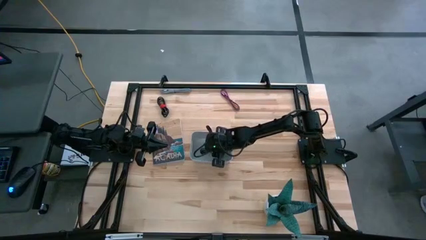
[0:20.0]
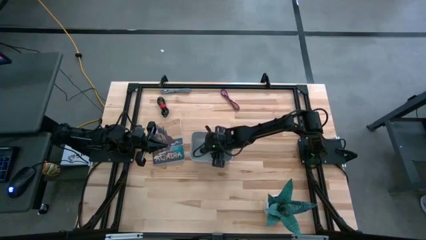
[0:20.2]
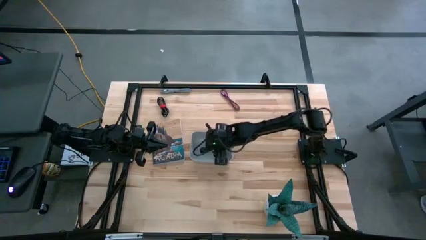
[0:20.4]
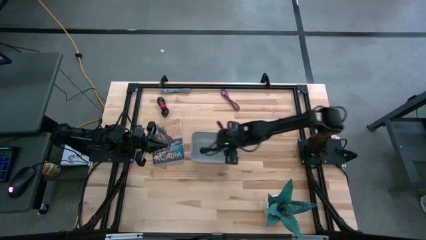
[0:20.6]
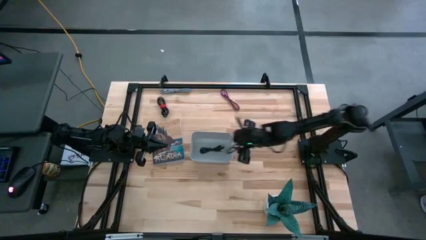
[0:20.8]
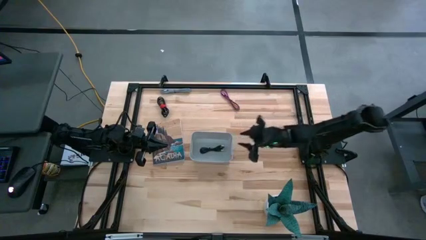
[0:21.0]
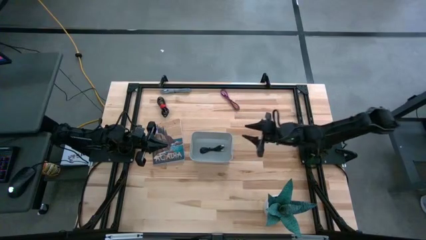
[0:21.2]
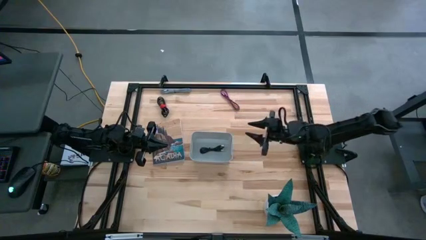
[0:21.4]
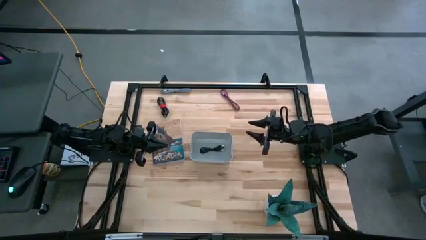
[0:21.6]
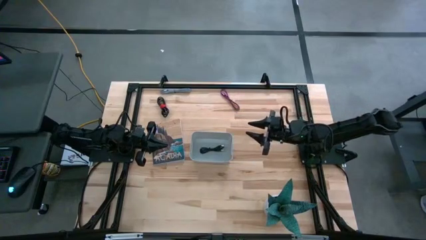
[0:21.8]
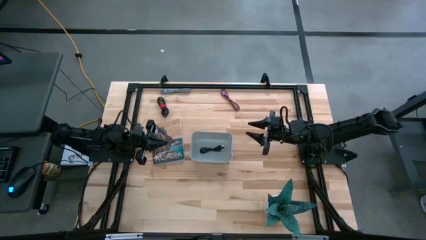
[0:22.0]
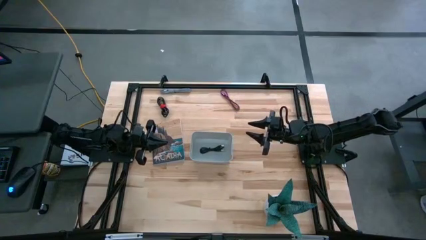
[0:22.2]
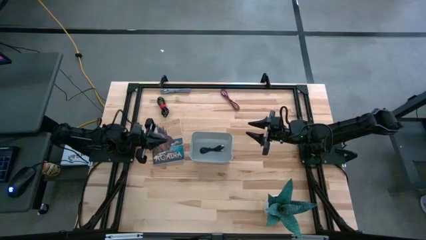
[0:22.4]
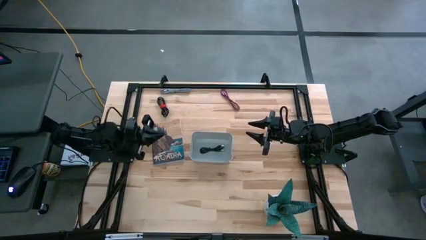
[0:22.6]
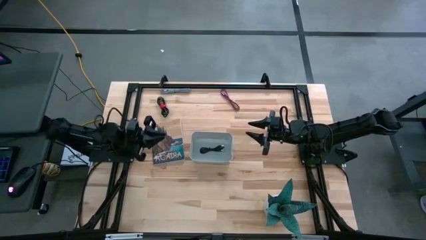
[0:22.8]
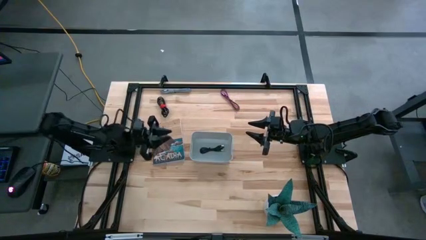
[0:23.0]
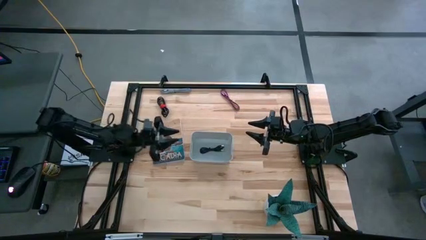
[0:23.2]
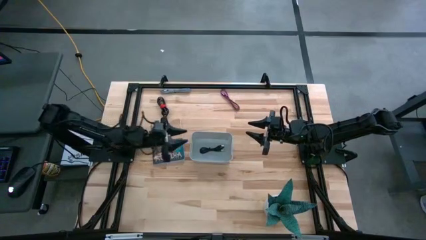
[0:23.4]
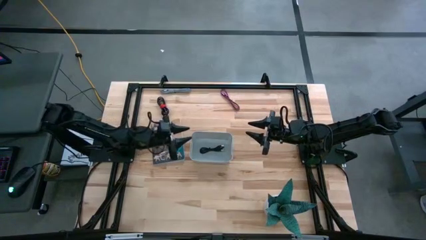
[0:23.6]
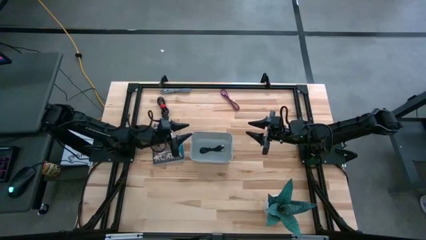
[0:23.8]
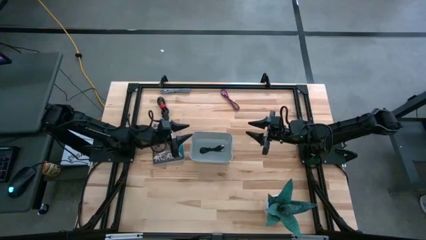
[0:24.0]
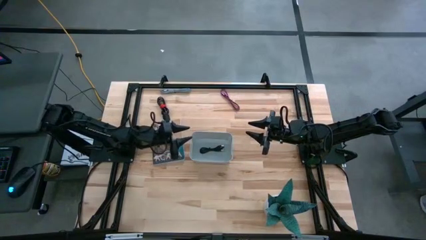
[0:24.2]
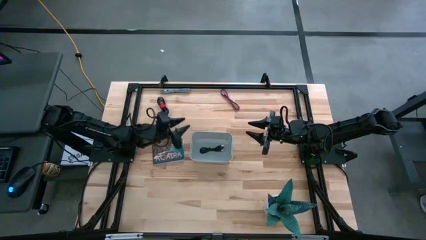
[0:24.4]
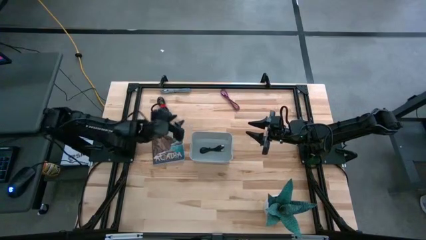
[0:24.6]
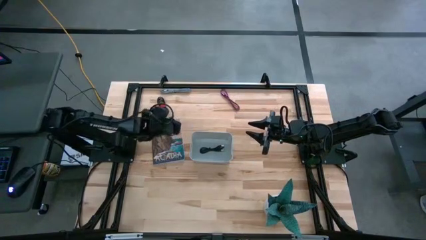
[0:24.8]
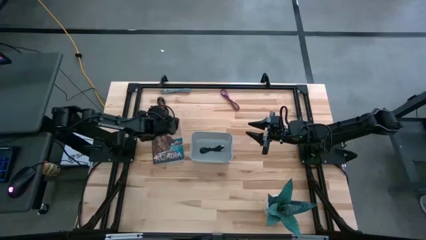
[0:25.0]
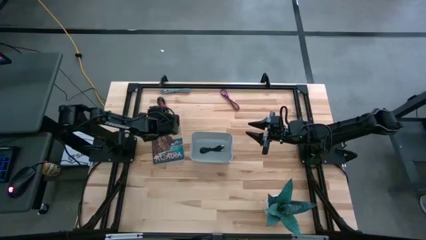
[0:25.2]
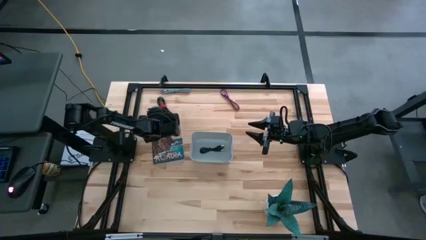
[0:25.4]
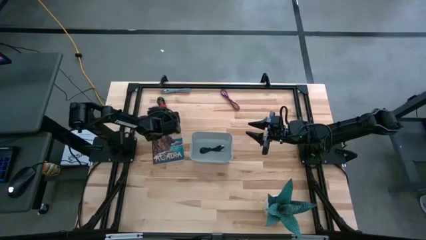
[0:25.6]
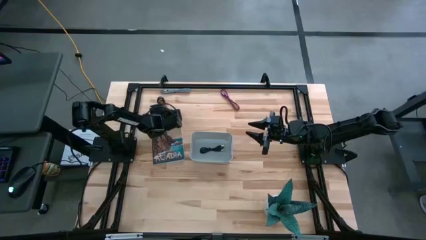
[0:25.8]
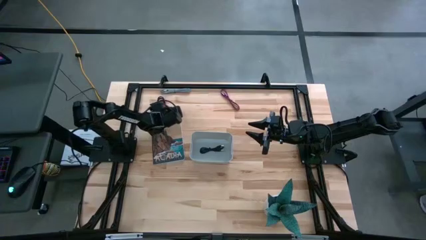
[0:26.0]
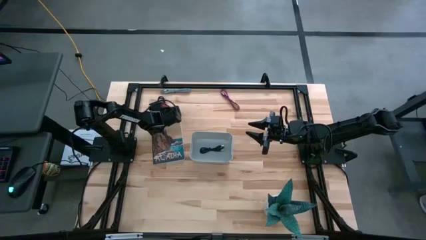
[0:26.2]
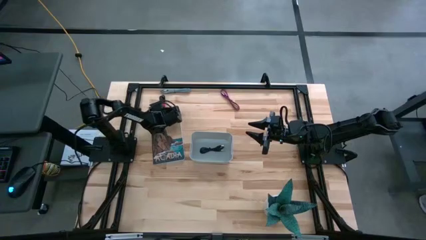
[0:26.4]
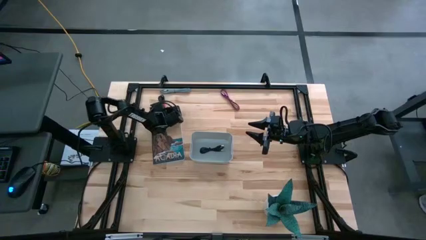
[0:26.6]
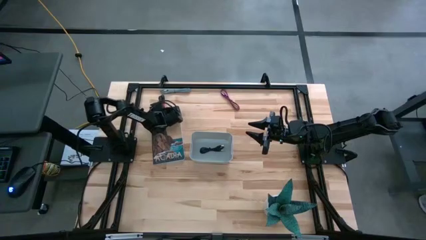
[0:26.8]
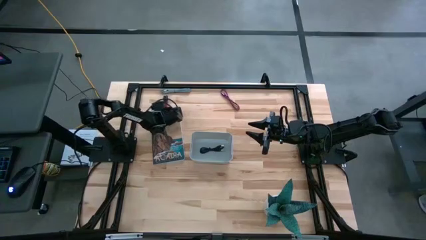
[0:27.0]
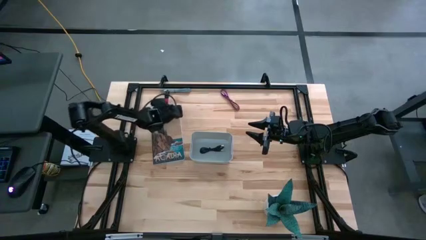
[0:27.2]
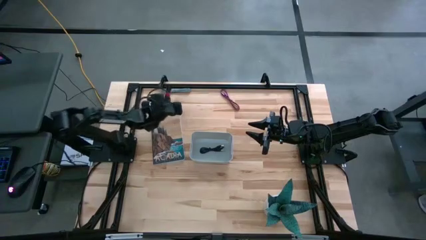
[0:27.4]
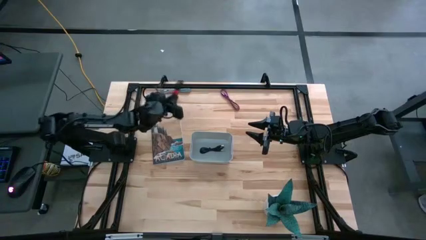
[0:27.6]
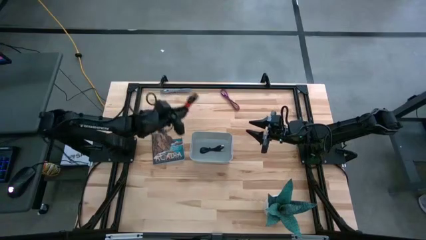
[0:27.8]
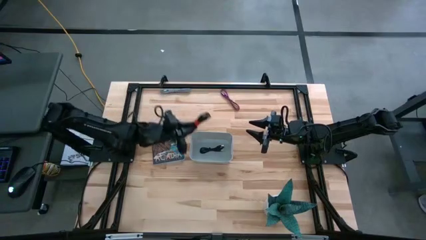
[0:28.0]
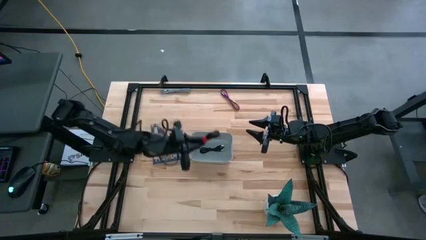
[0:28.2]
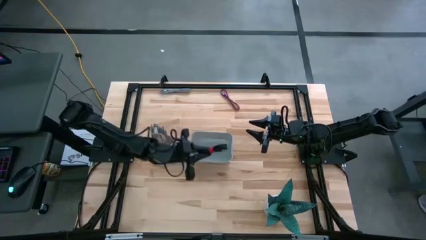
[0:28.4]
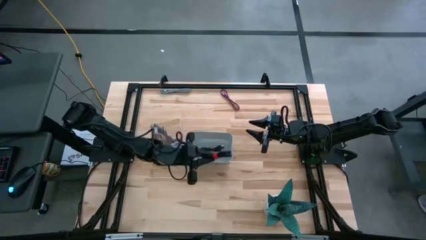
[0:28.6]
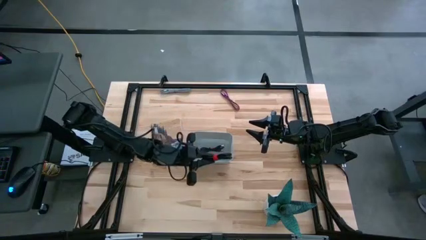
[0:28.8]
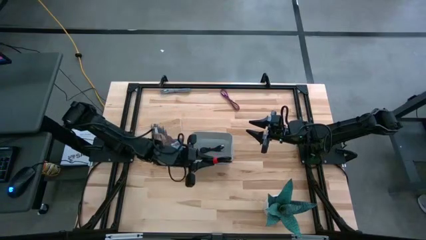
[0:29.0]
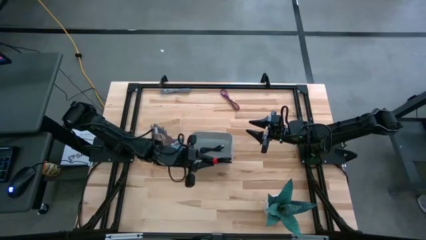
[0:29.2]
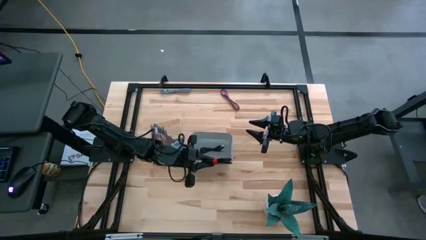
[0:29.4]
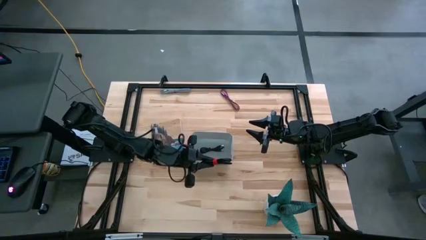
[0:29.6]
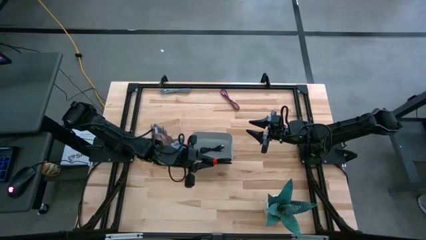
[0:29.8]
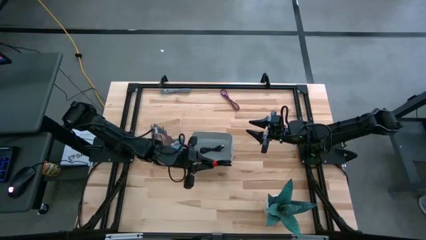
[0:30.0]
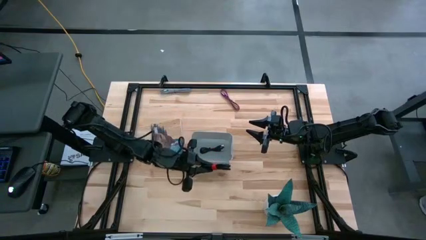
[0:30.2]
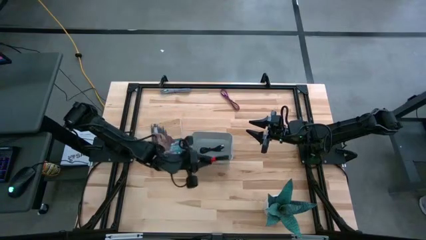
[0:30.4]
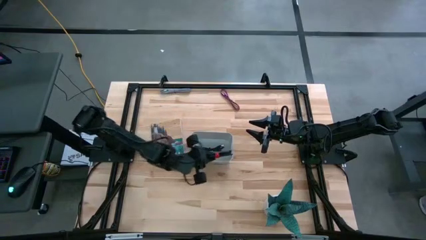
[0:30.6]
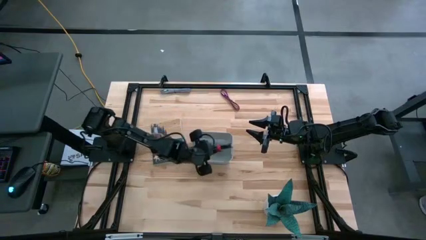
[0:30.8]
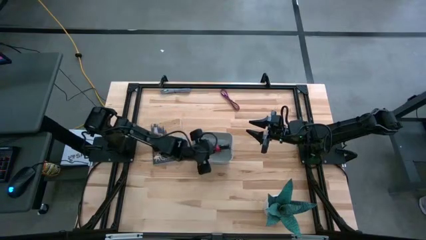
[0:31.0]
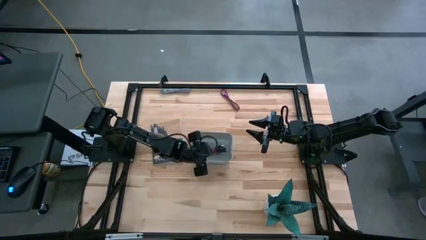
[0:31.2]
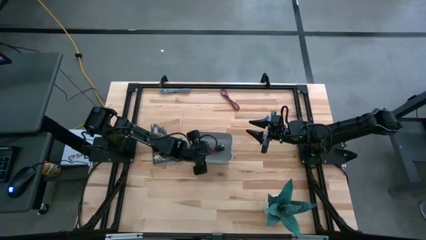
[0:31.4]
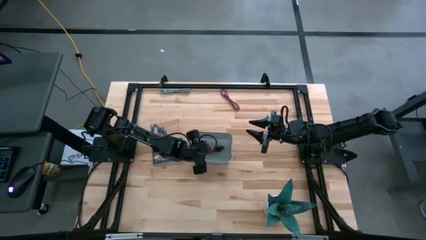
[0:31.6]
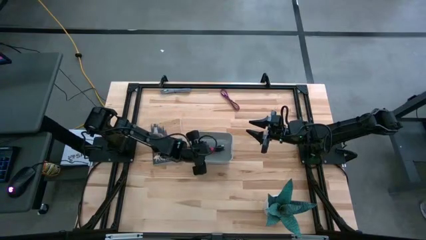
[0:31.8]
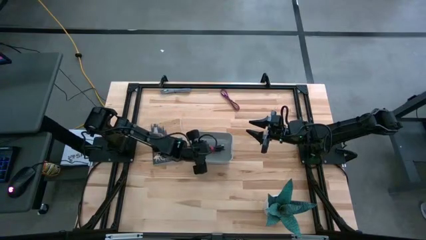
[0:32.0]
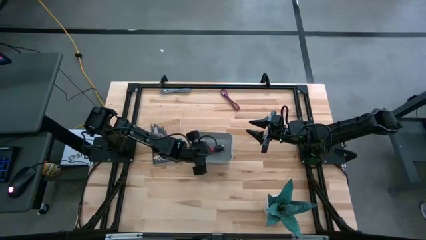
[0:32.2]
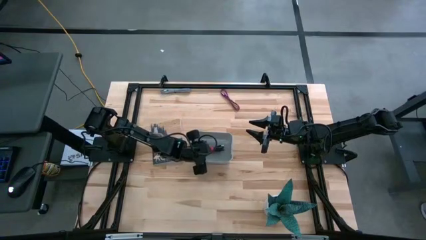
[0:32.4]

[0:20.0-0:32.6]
Task: Pick and place USB-C Cables
Put the black charger cable into the gray bin

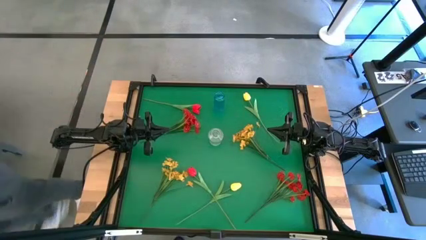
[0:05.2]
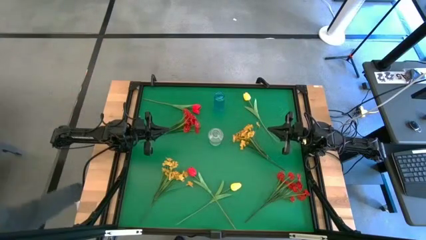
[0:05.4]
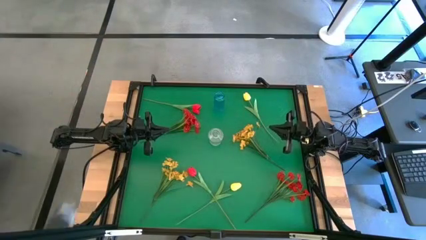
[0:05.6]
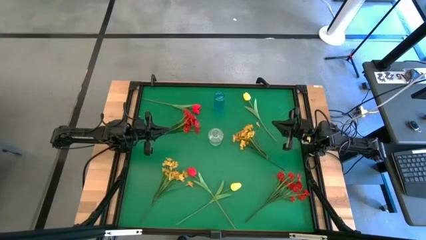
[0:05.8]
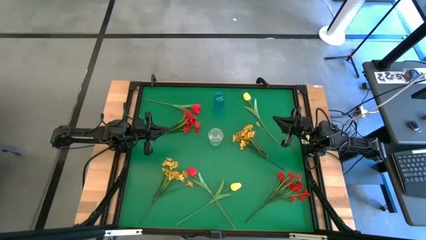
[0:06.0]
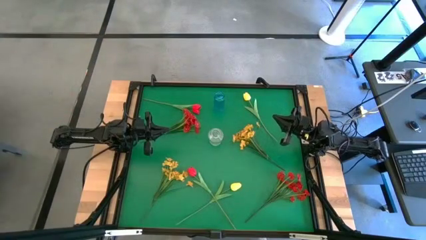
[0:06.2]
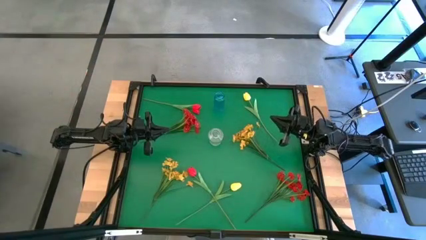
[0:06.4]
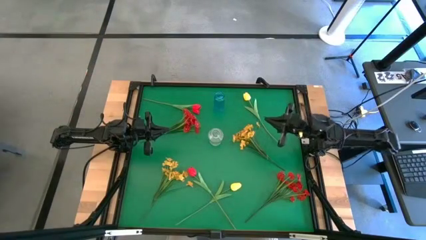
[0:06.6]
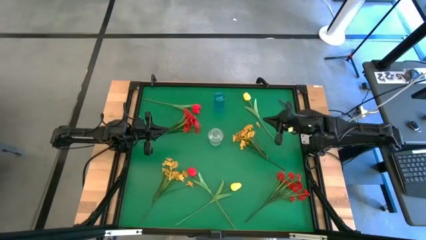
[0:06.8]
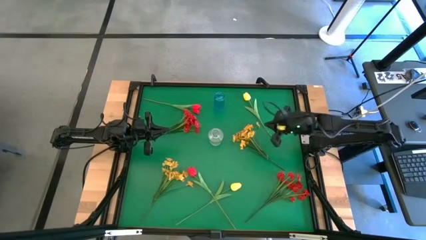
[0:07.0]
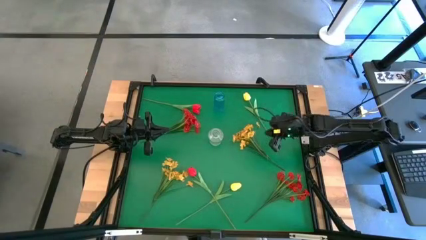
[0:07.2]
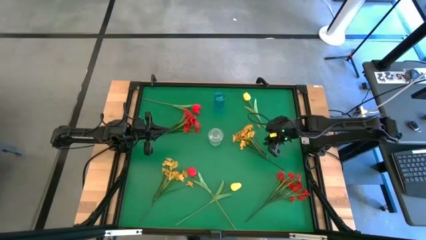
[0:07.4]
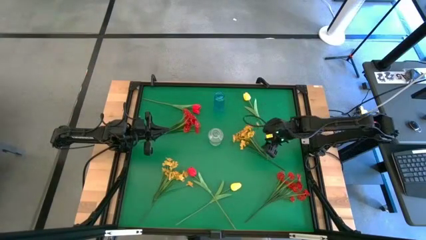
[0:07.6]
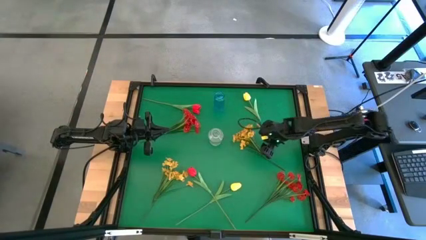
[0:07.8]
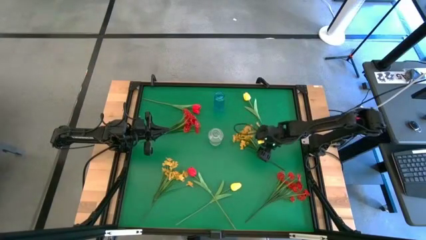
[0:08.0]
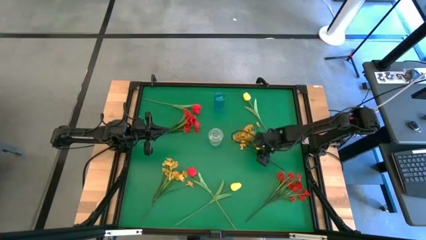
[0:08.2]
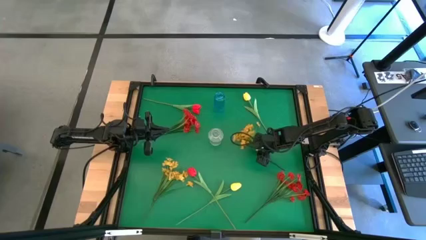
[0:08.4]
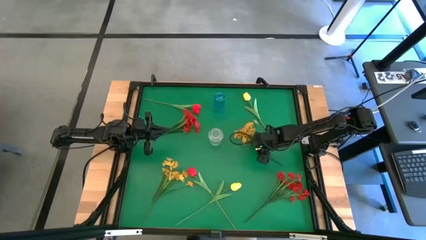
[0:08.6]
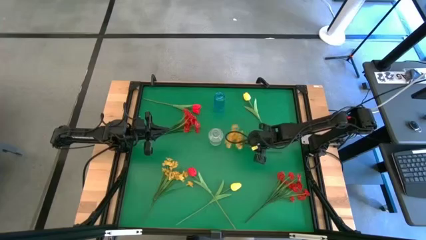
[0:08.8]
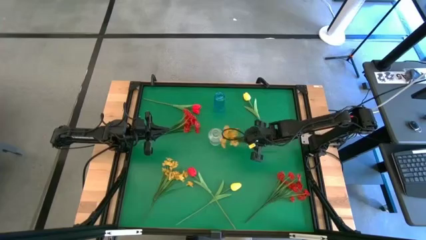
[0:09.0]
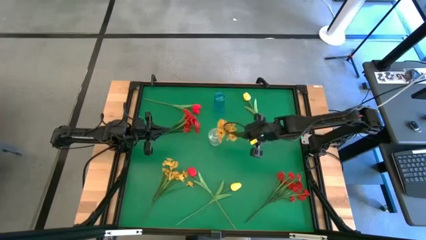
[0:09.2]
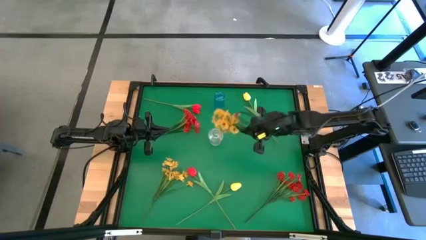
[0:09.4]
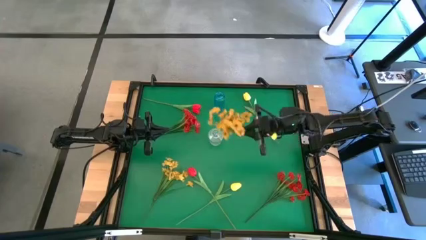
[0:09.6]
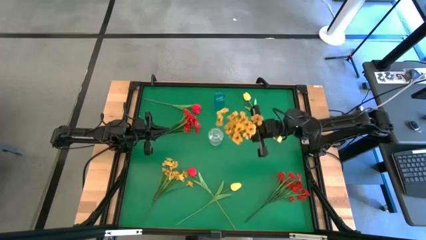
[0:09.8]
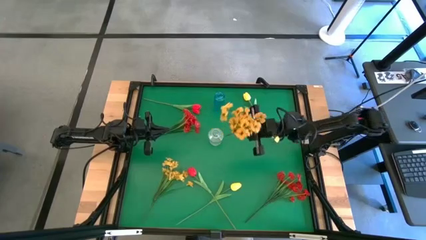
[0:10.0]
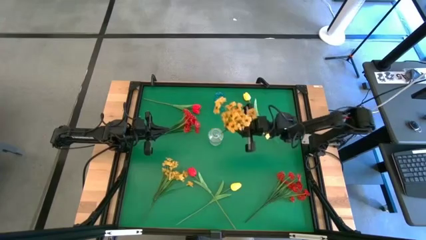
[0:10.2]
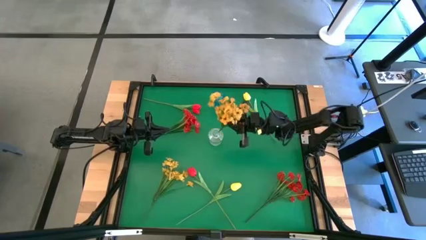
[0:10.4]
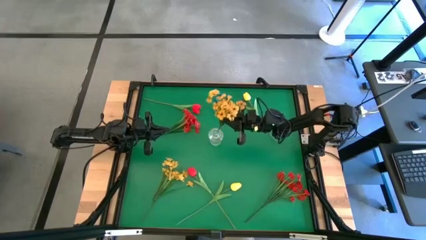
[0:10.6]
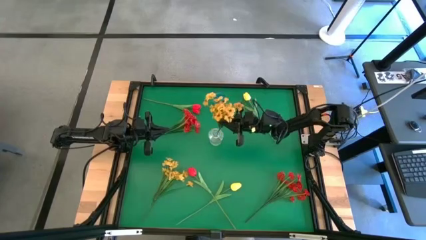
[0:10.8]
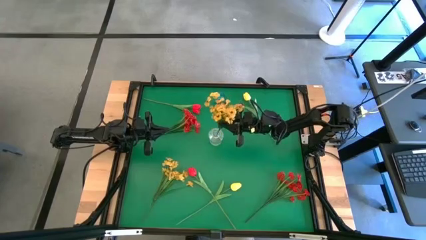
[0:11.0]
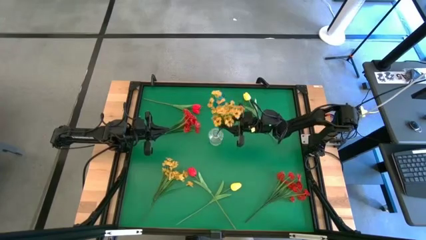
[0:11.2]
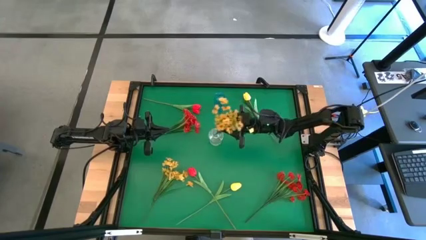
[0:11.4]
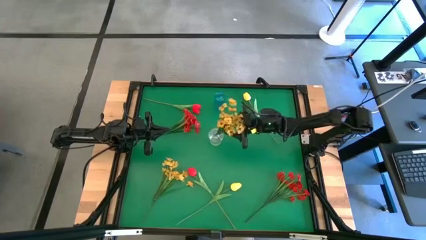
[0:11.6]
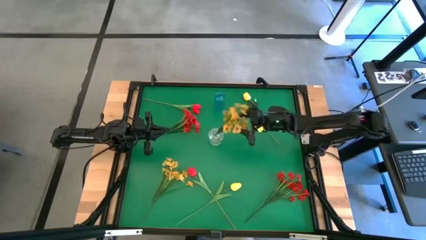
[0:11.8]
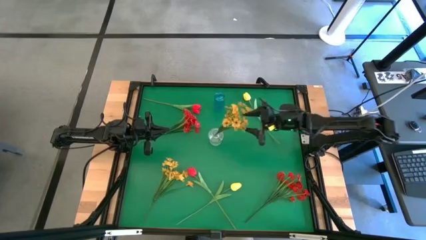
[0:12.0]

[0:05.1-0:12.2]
Task: Sort flowers into vase by color
Put the right yellow flowers into the transparent vase
